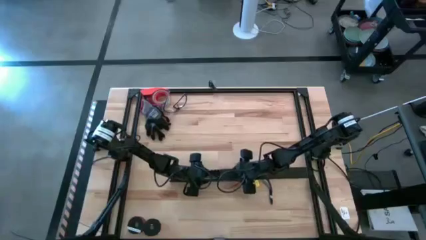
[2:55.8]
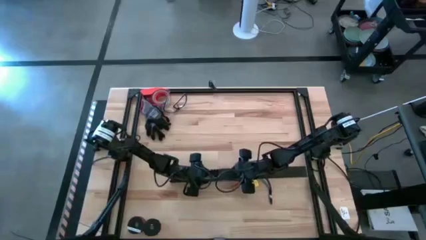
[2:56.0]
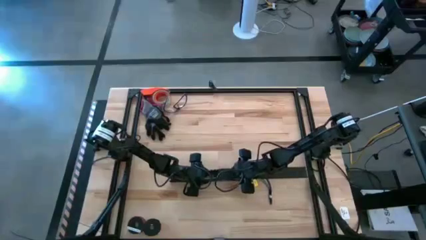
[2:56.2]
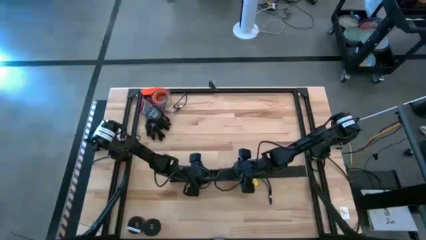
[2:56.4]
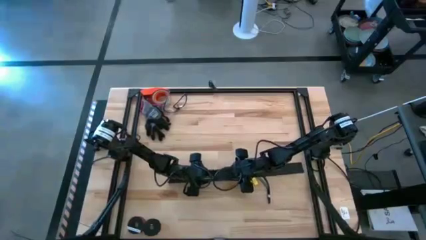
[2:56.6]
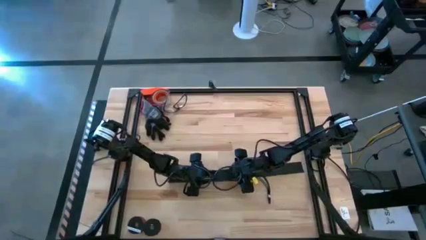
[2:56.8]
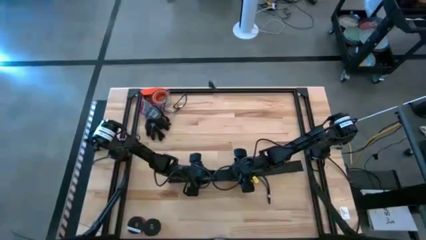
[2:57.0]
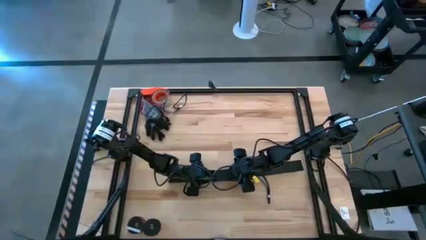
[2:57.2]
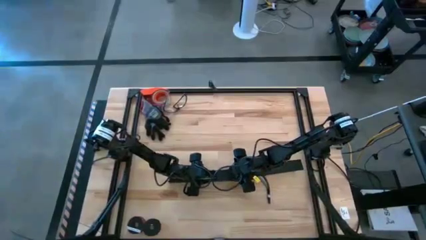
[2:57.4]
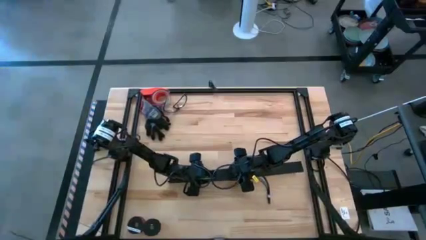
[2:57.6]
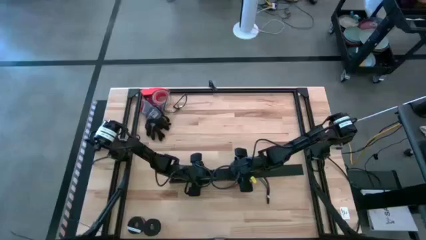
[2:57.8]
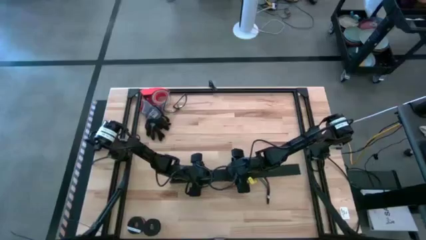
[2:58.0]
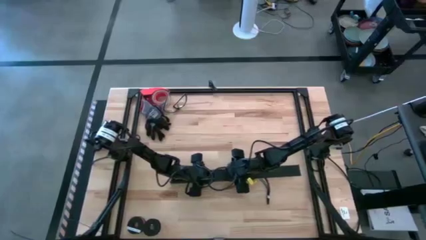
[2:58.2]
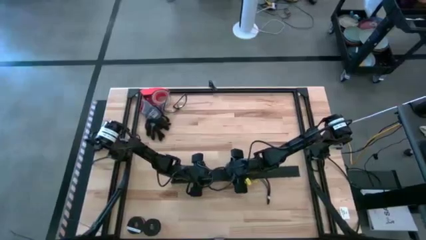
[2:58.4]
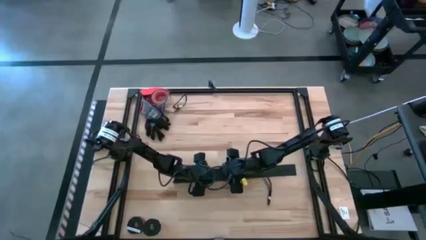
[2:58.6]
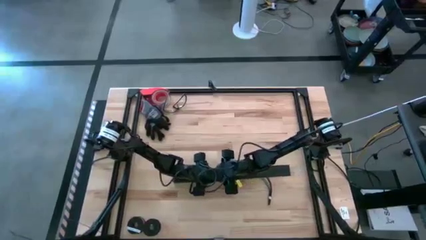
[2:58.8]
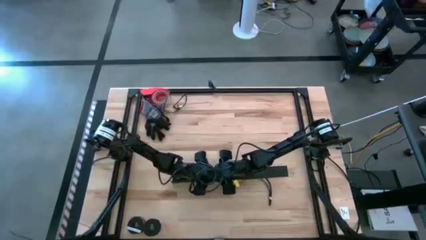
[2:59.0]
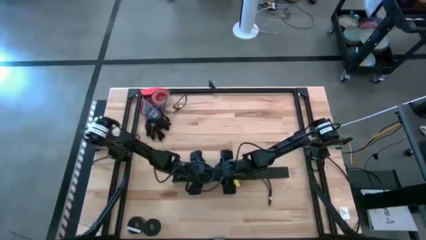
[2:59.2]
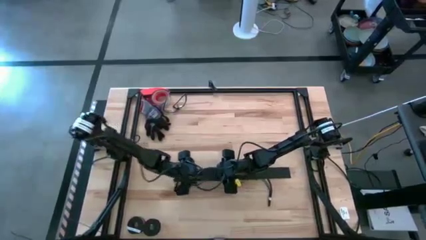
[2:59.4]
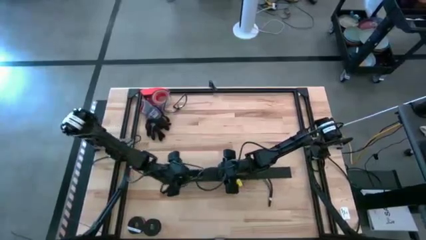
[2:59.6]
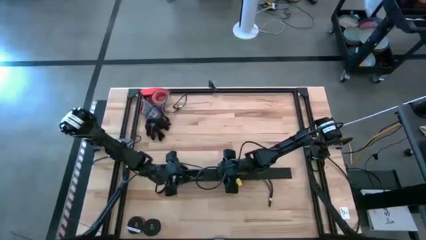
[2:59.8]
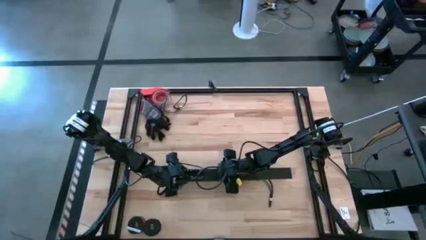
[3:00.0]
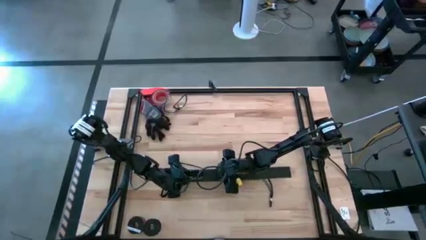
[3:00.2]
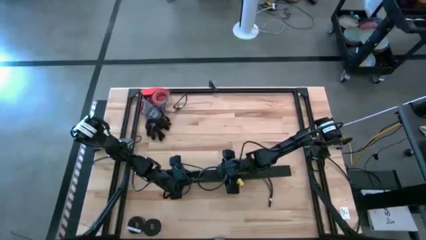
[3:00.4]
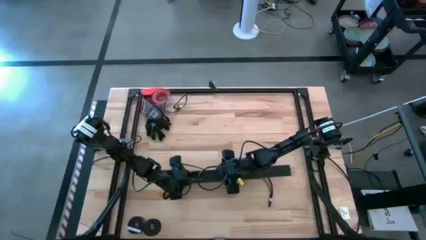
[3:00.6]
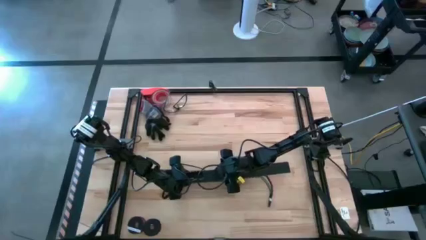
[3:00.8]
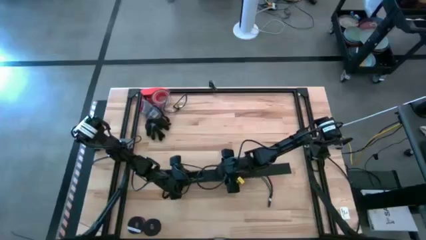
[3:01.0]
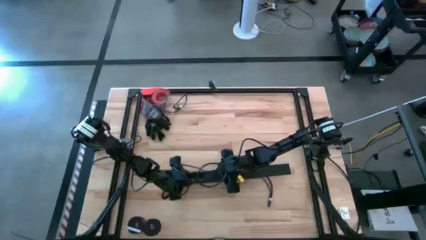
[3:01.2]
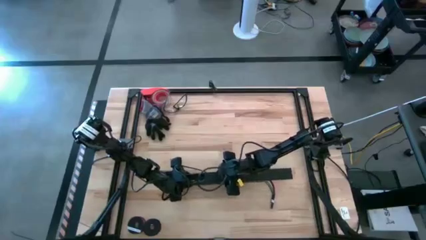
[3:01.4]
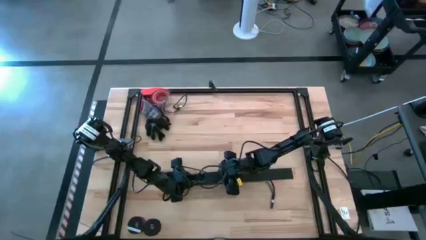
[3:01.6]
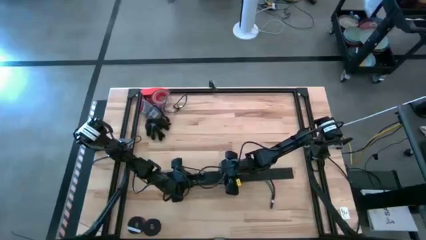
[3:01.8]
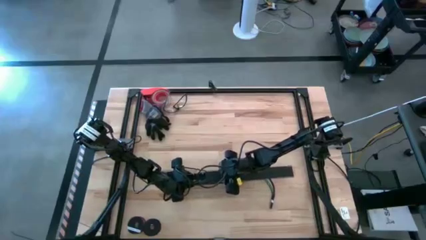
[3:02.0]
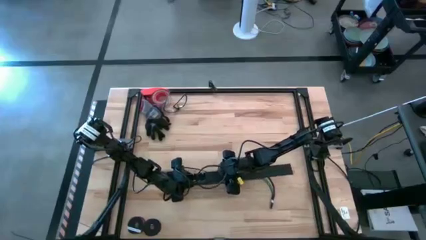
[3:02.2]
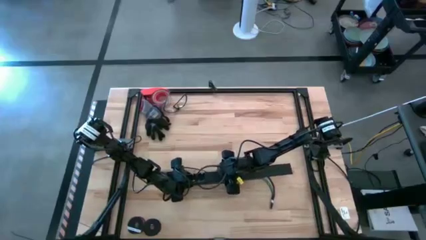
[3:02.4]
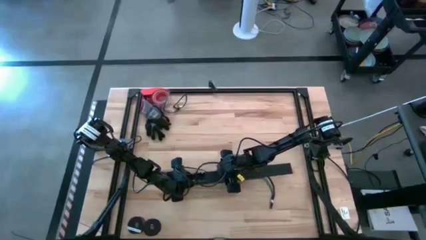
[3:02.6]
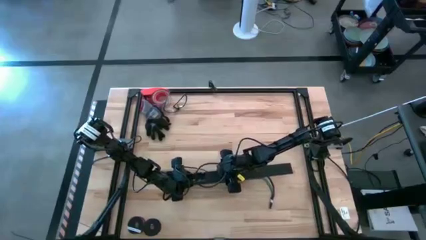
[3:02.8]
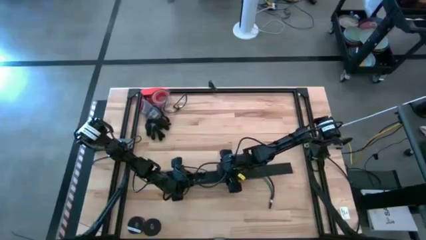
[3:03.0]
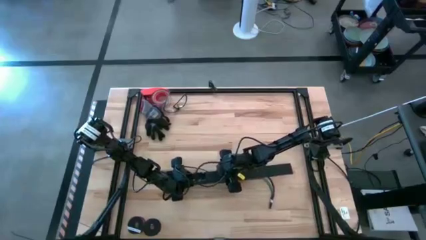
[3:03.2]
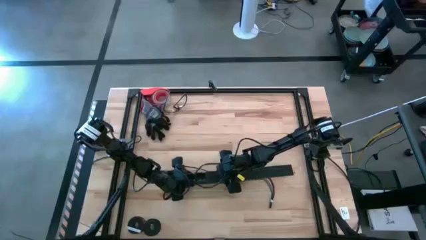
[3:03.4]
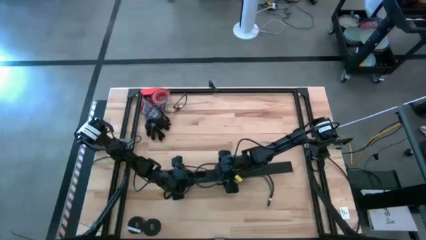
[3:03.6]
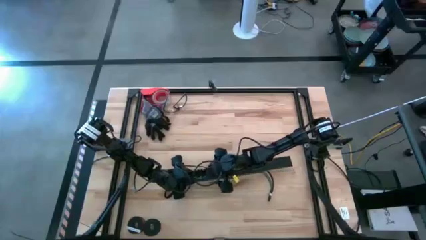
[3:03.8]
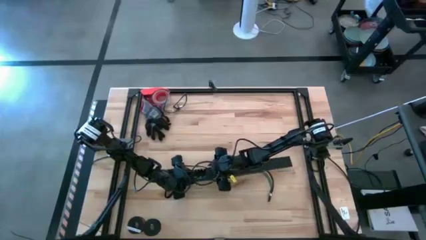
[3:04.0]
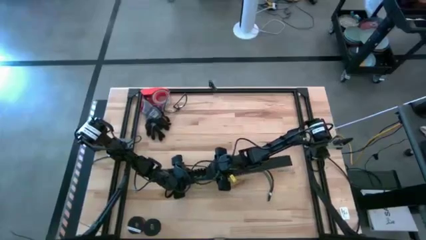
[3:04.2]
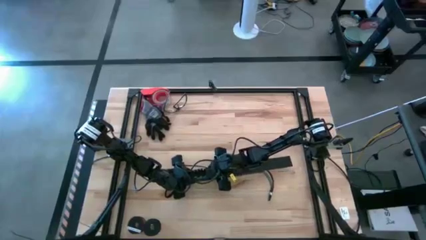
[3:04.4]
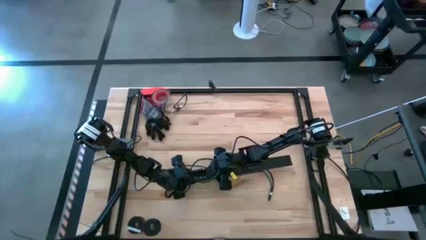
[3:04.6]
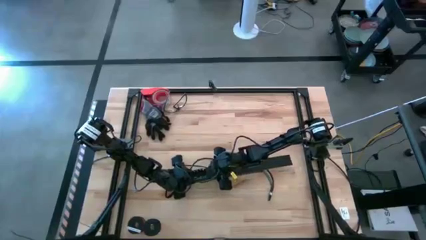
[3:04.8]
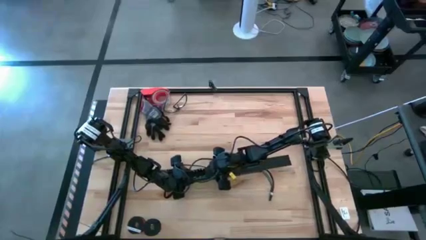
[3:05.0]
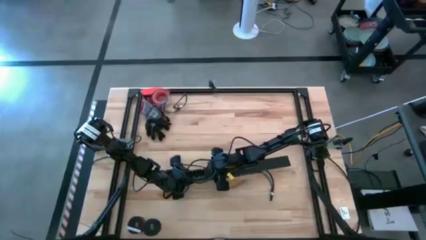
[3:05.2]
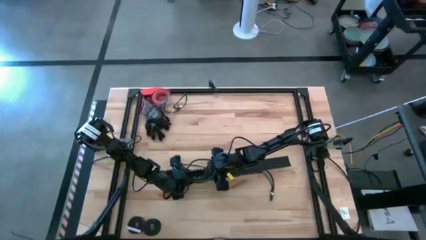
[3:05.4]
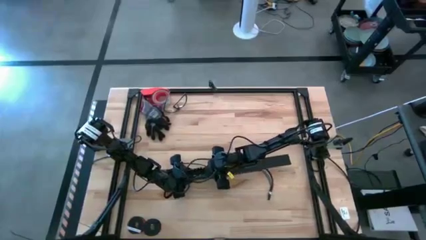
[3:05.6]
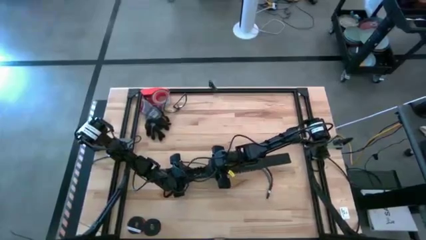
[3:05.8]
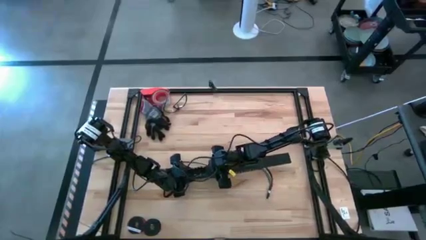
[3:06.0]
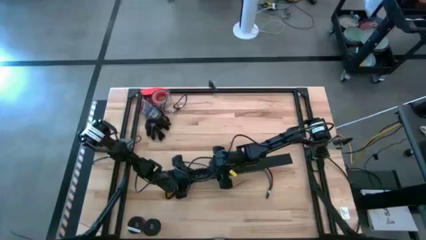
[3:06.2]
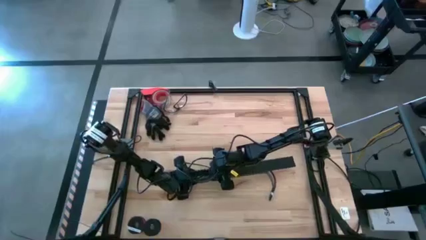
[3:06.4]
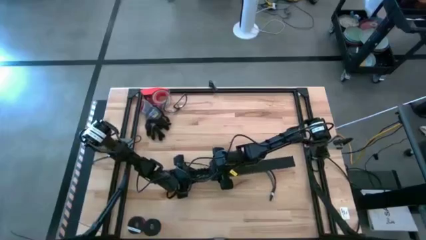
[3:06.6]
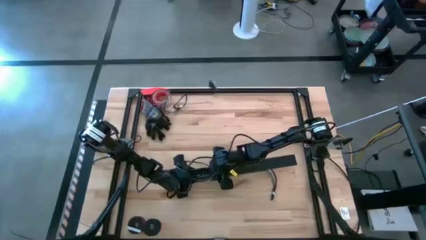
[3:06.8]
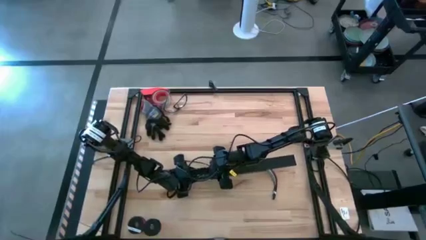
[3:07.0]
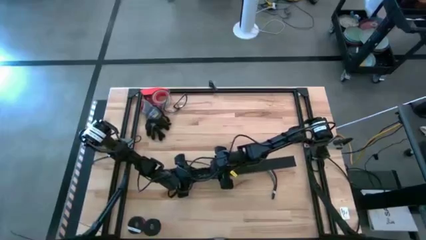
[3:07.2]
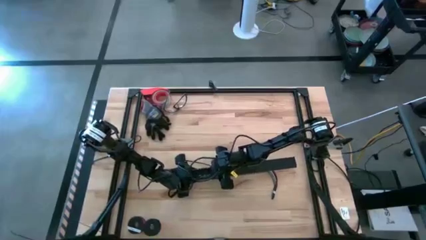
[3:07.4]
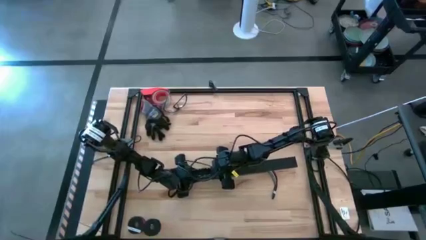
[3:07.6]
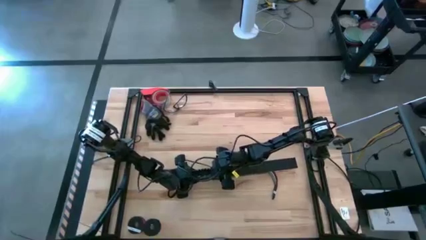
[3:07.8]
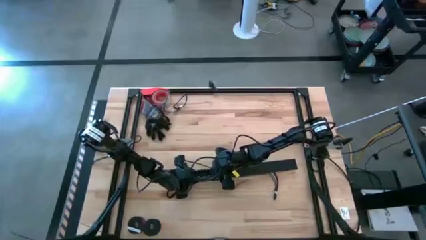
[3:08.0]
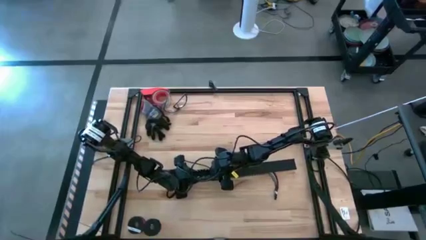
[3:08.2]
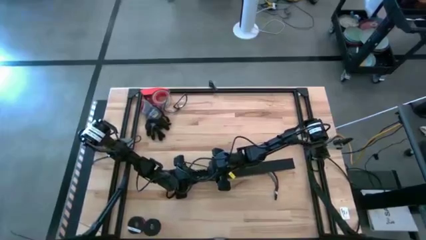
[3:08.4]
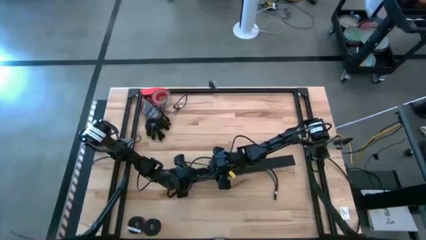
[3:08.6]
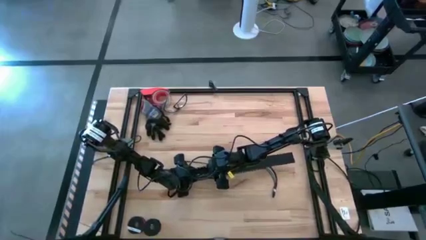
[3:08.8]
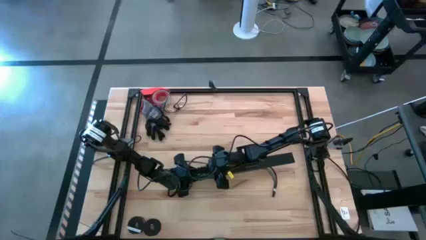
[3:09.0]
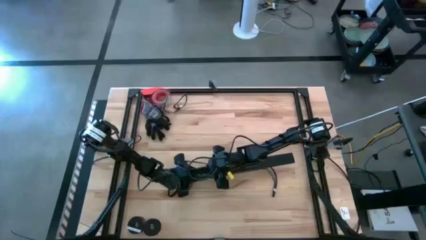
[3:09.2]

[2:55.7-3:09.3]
Task: Ziptie cables
Close the black cable duct

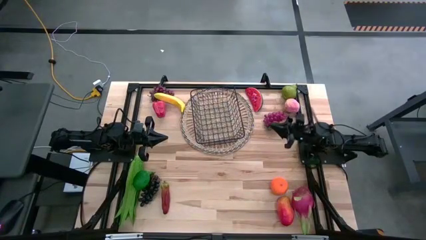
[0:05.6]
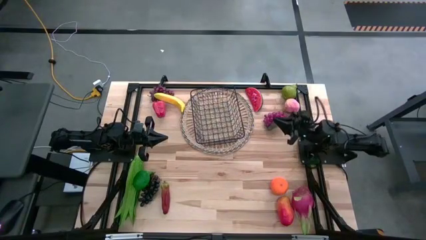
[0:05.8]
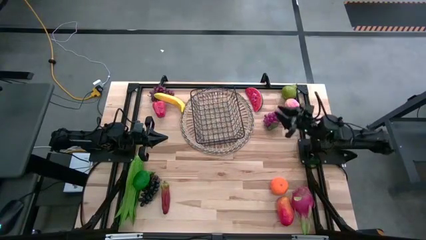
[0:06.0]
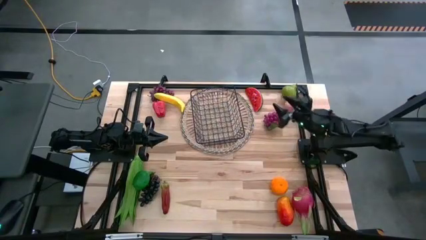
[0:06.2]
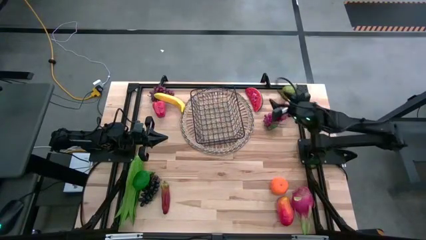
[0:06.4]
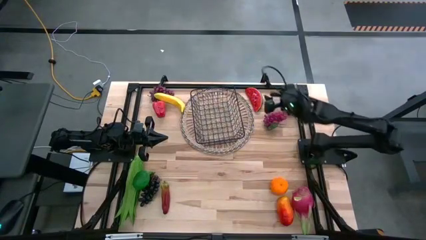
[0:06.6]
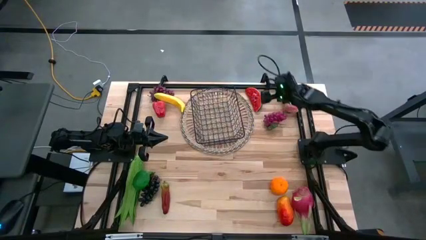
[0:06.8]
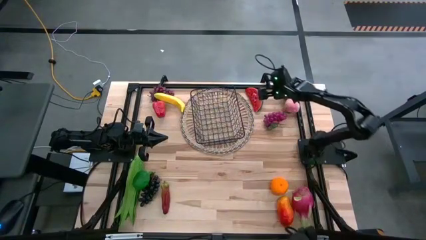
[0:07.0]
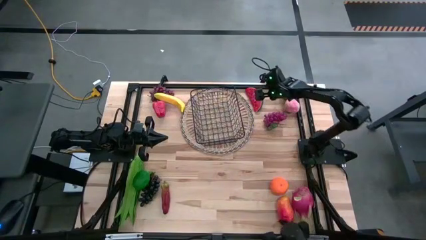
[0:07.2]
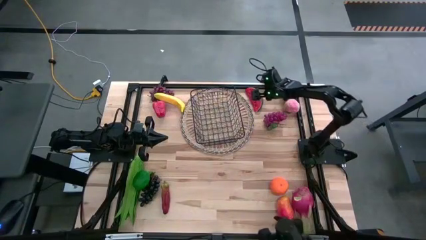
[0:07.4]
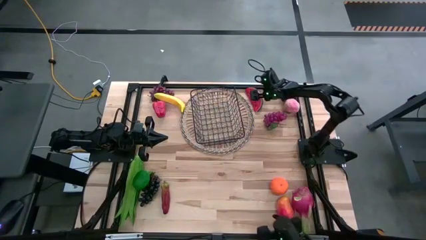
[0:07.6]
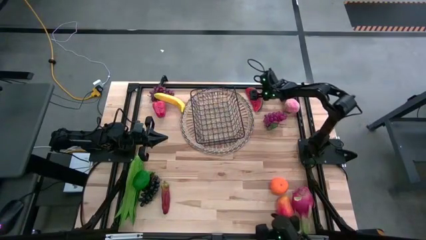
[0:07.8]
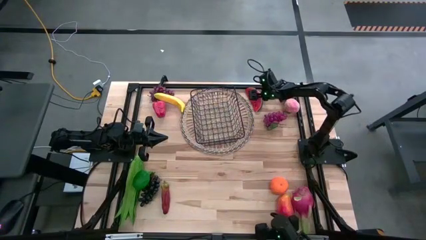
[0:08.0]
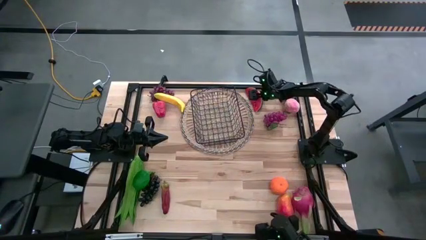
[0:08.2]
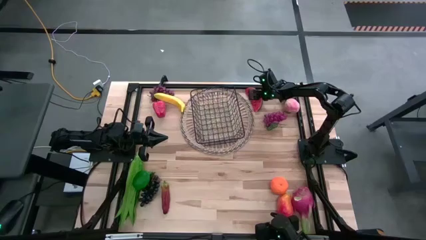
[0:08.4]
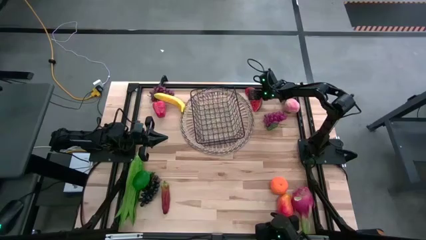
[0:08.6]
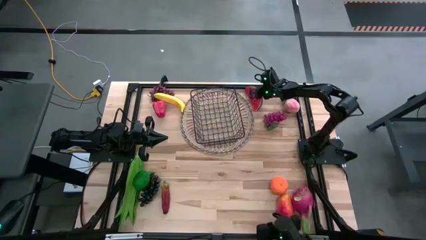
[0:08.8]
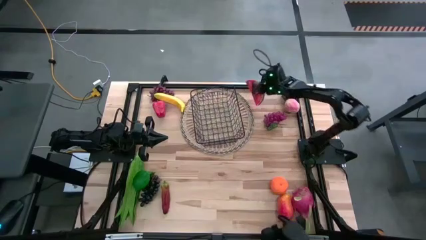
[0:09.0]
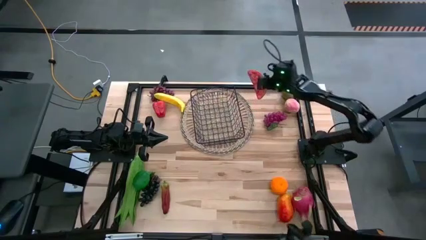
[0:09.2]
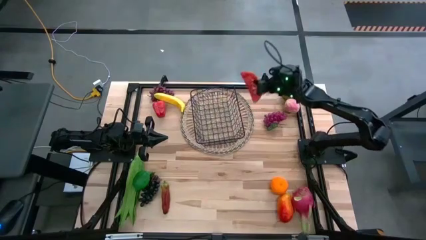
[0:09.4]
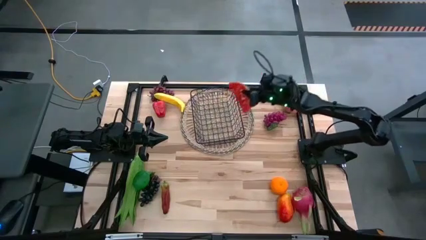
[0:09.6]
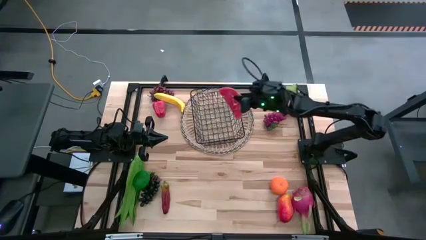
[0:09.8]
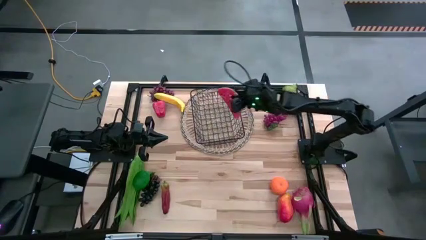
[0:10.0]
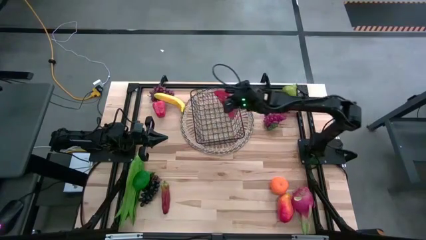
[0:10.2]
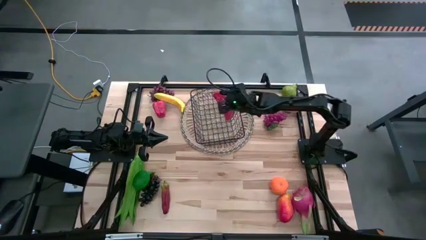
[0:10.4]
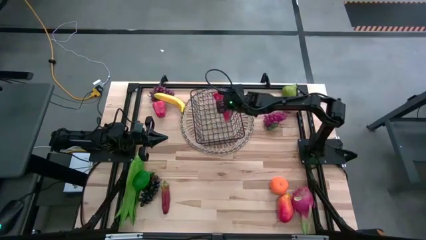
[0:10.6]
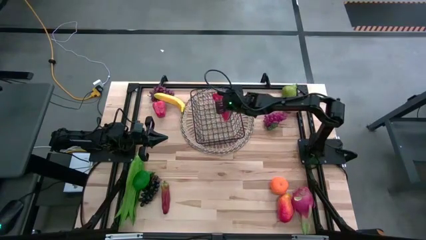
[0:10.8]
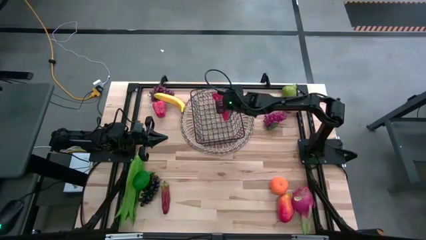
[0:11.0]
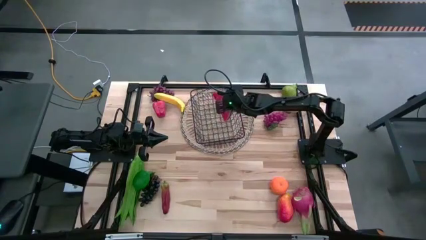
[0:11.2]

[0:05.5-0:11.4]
Task: Build produce basket
Put the red watermelon into the black wire basket
